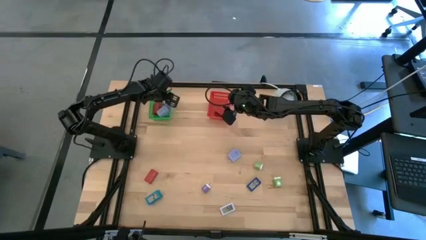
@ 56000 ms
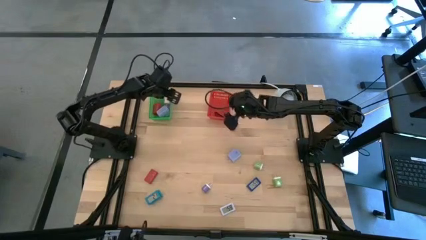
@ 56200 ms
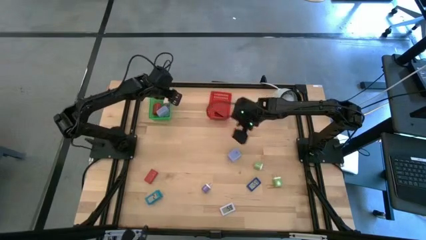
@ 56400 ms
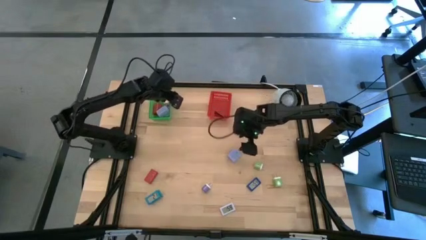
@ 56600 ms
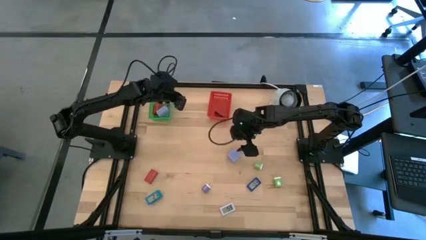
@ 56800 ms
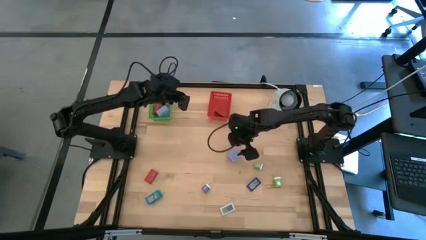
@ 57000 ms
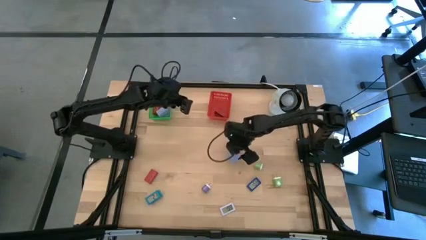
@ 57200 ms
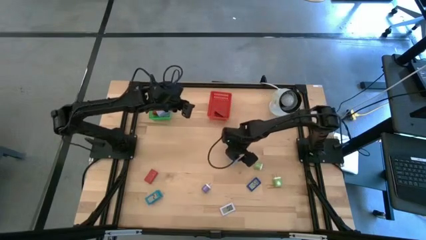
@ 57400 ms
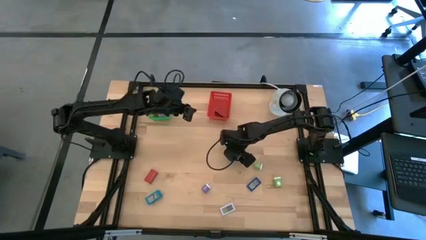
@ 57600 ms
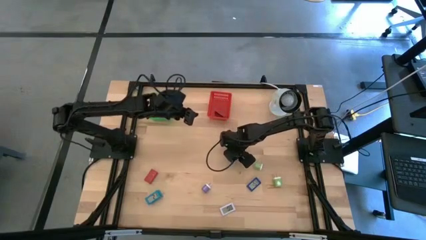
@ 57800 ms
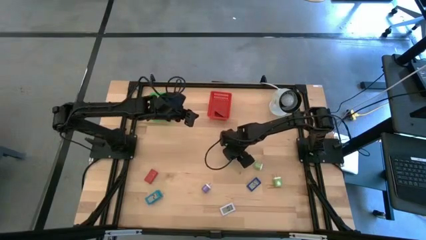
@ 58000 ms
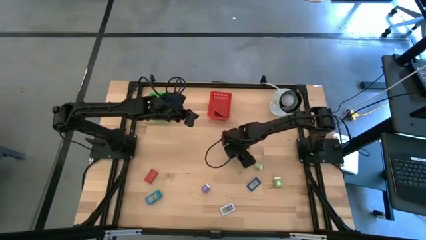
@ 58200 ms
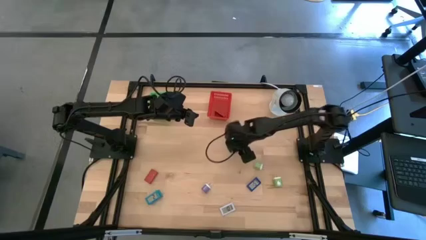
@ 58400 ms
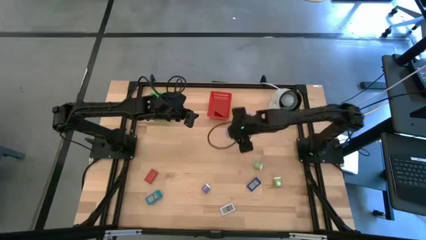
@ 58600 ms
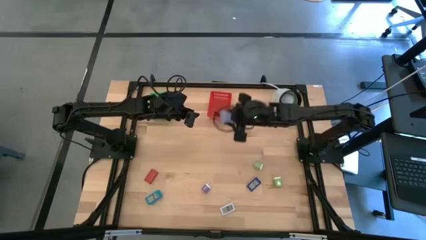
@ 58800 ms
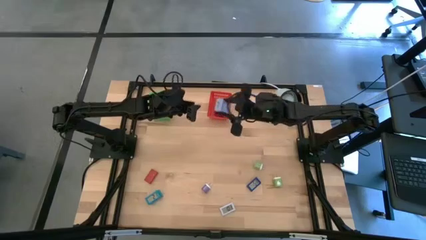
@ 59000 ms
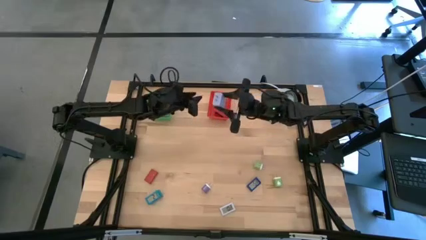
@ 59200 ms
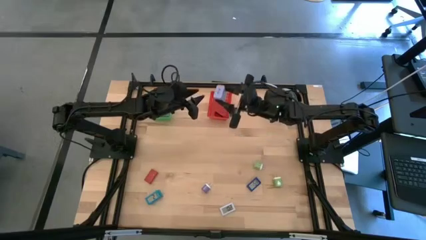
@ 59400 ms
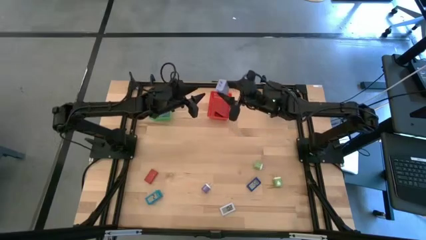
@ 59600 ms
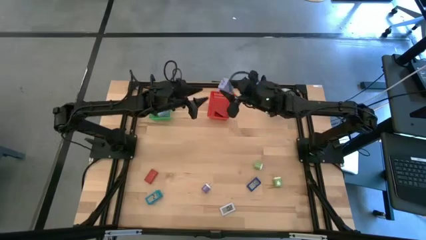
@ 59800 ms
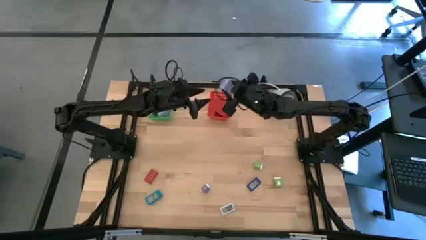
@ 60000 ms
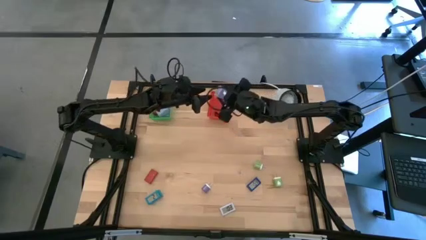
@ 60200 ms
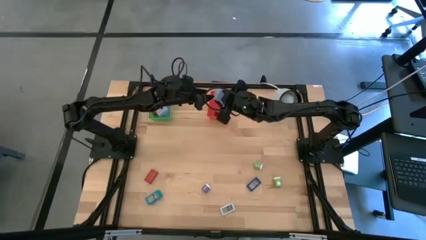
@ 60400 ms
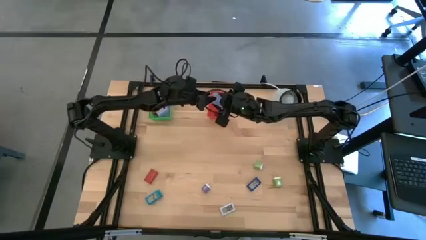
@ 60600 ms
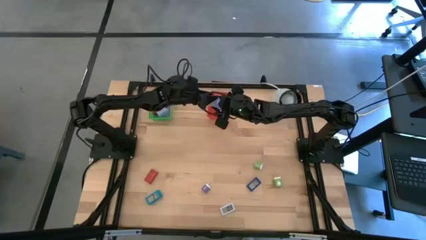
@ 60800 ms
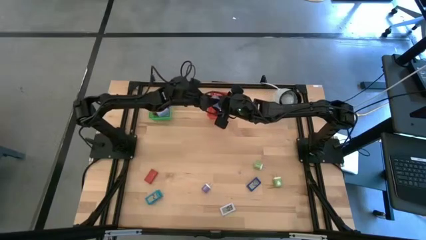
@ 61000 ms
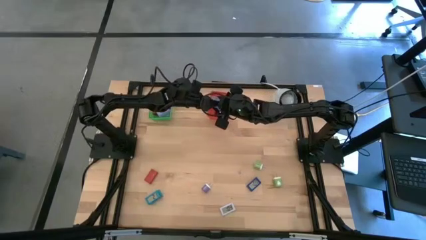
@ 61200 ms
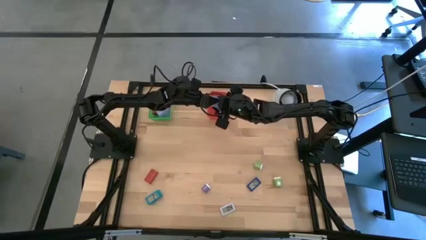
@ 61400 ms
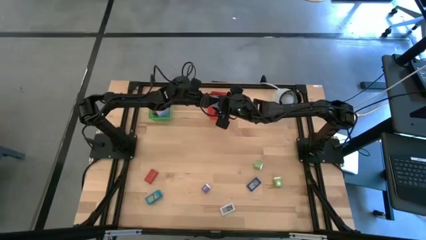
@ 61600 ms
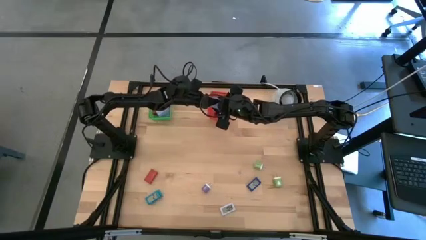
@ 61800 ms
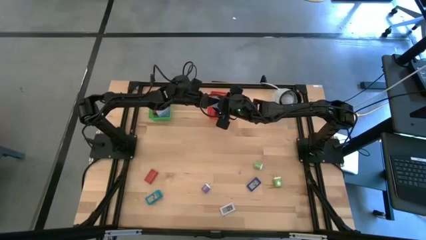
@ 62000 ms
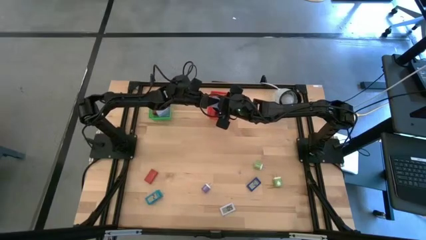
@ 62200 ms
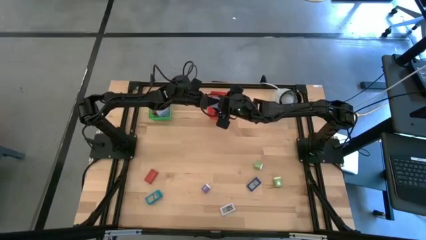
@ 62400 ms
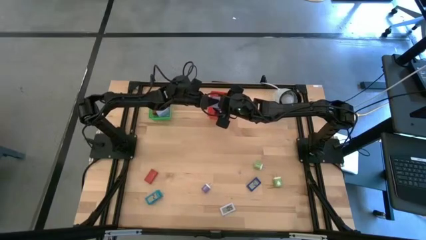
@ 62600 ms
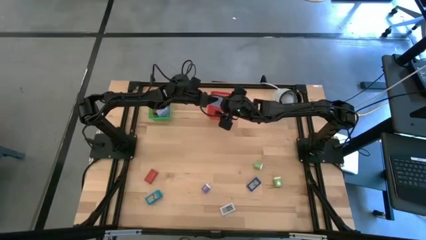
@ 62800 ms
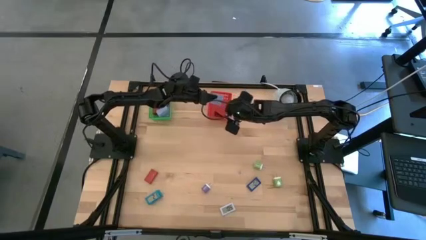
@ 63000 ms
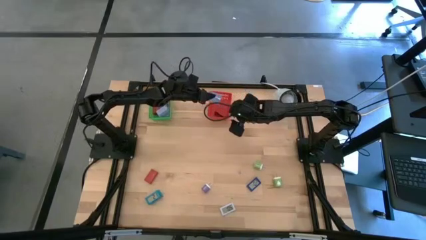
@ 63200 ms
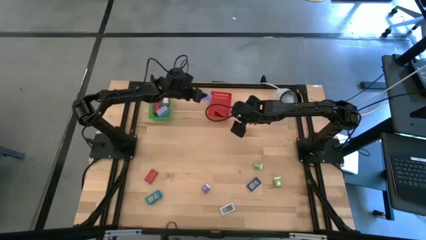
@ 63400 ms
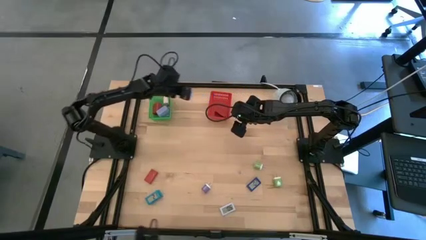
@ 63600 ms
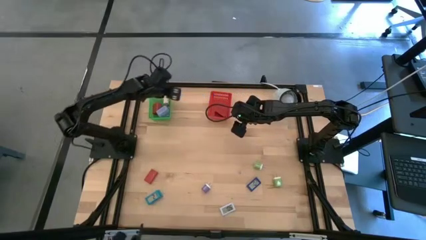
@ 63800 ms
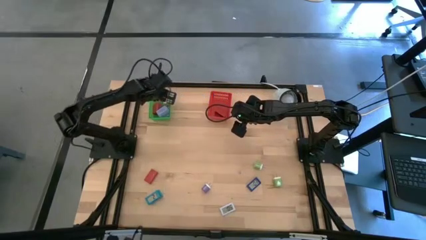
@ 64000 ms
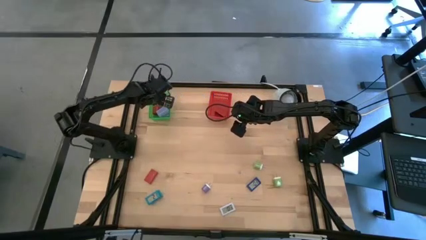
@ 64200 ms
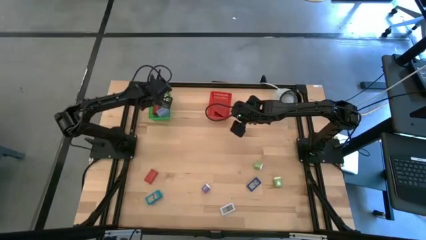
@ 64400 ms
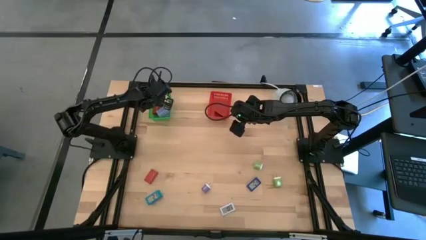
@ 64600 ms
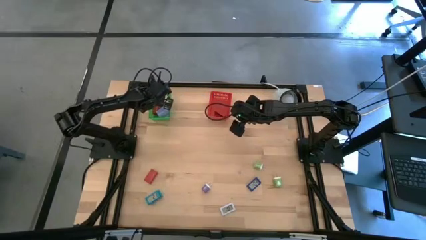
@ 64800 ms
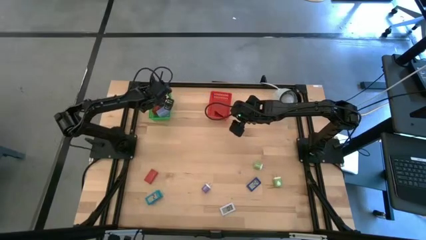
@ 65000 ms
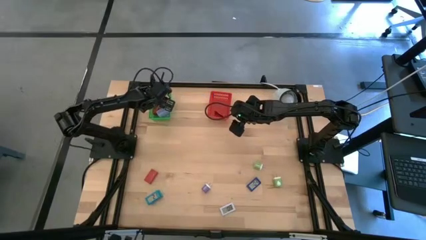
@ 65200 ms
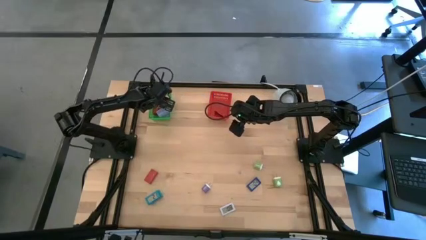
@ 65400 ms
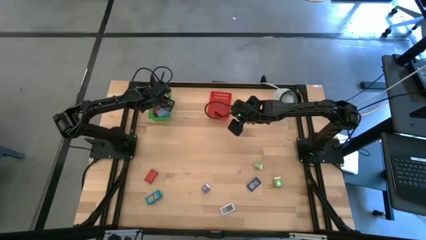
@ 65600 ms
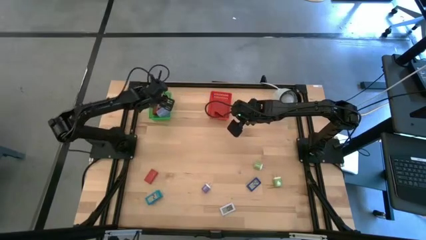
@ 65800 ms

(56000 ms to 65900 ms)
Task: Pick & Place Office items
Put the light blue charger adapter into the green bin

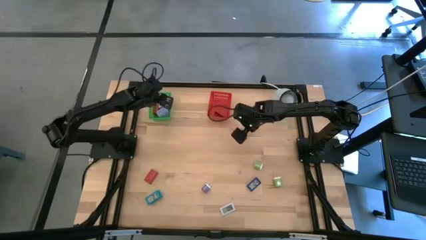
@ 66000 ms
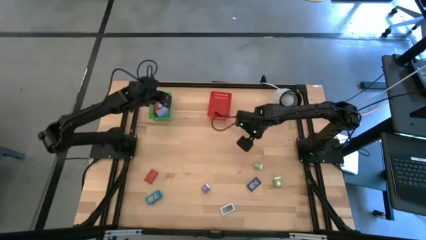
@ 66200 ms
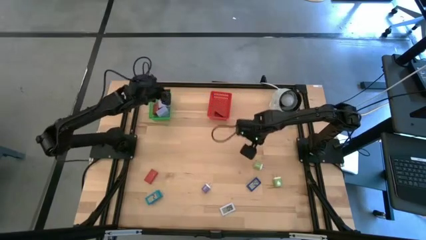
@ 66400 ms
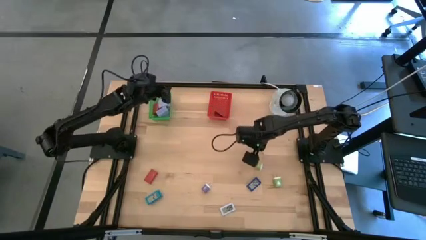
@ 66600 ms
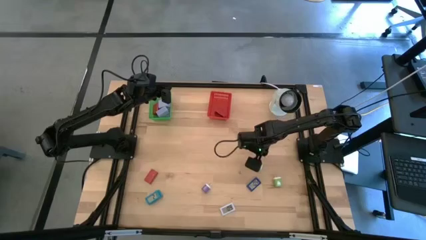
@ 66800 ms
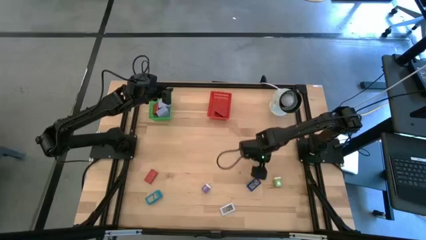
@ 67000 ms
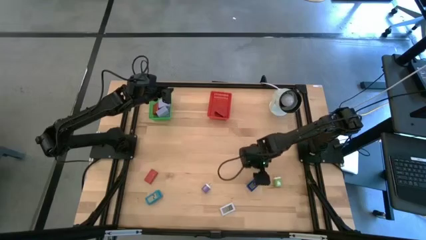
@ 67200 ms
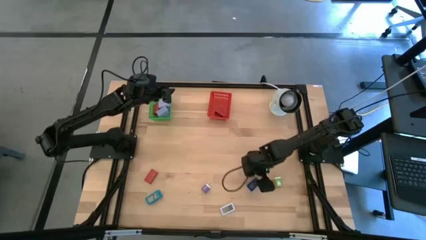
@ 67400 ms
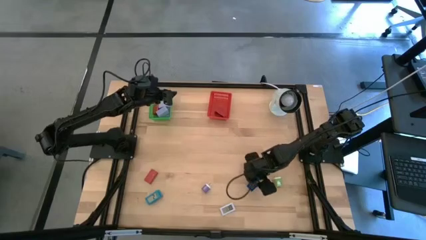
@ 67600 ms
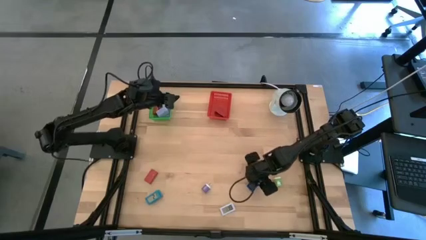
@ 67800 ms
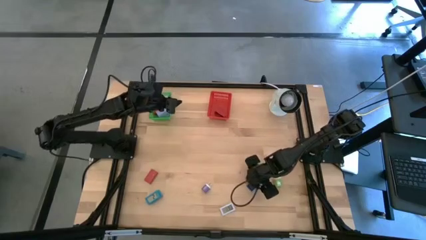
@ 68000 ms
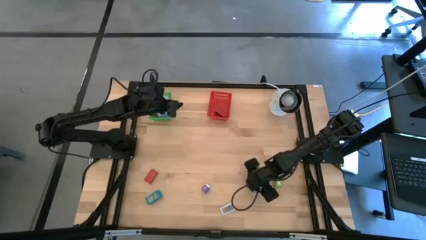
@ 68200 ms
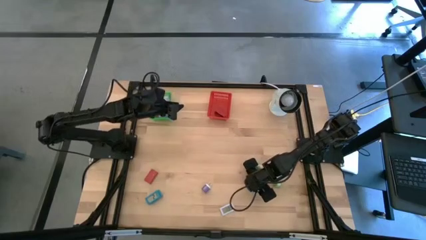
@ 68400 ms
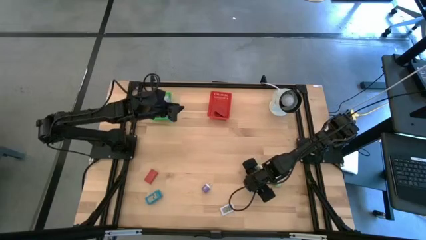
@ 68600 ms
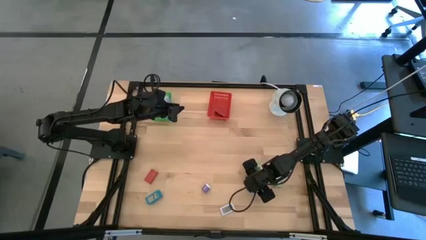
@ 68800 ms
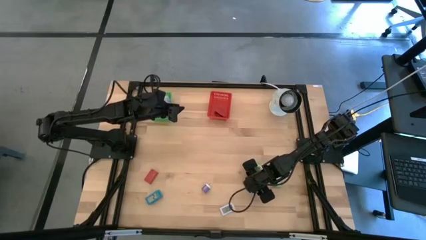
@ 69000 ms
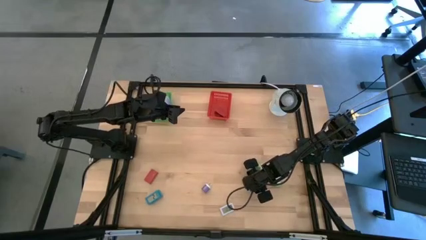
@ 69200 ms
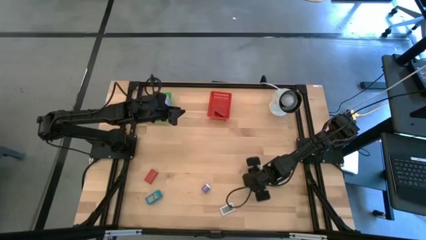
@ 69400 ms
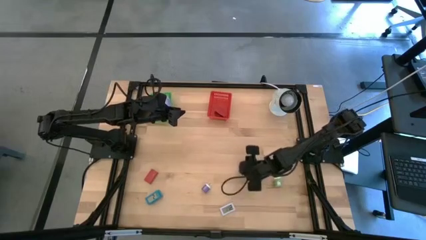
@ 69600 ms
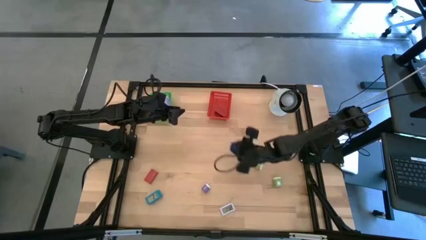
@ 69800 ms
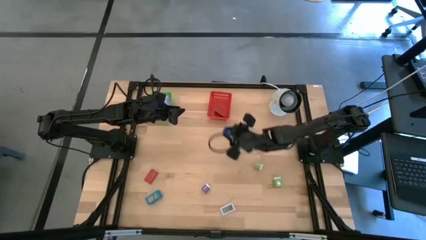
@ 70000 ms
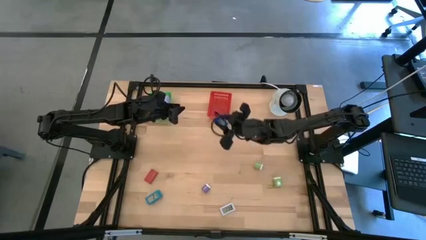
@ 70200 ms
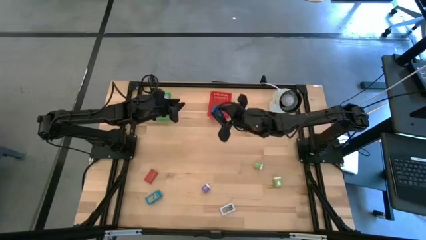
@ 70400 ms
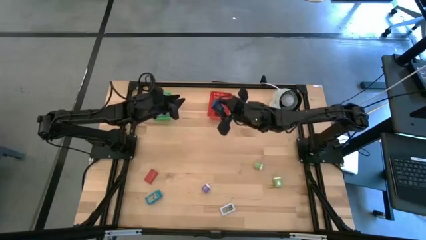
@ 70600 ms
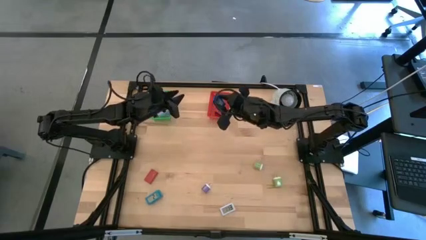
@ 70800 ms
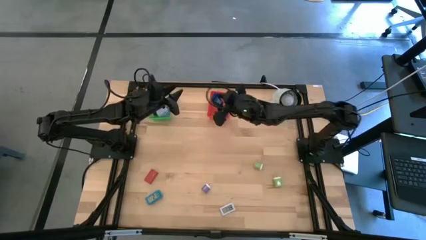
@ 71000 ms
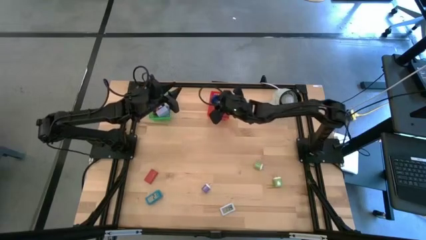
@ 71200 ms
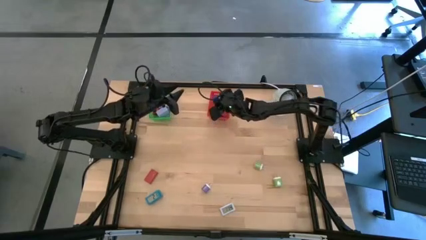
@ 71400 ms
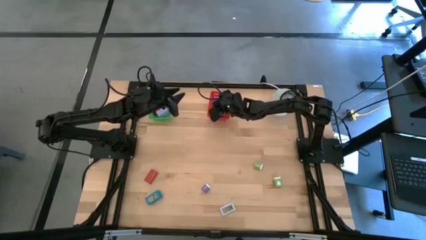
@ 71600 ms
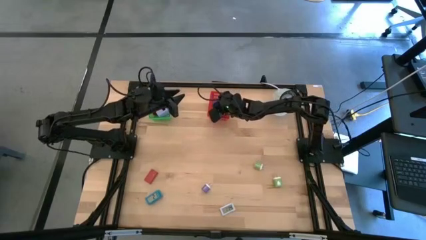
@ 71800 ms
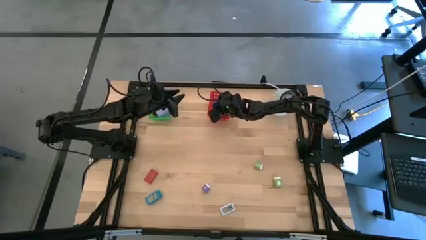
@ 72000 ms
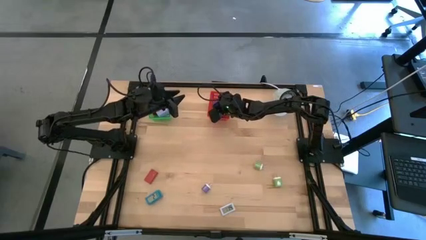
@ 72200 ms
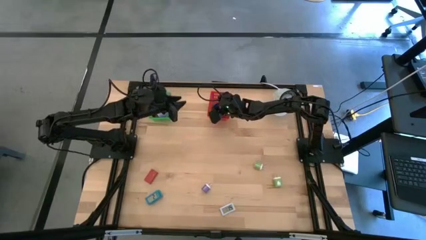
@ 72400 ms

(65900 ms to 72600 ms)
Put the blue digital timer into the red bin
